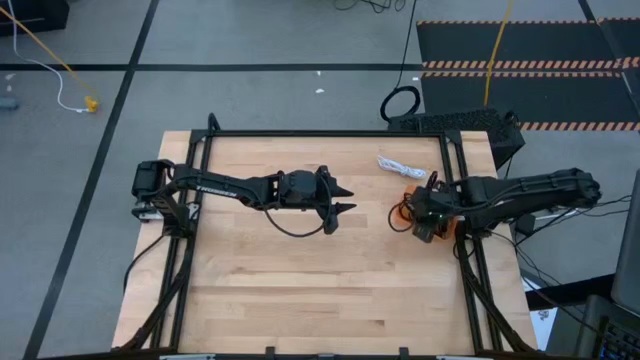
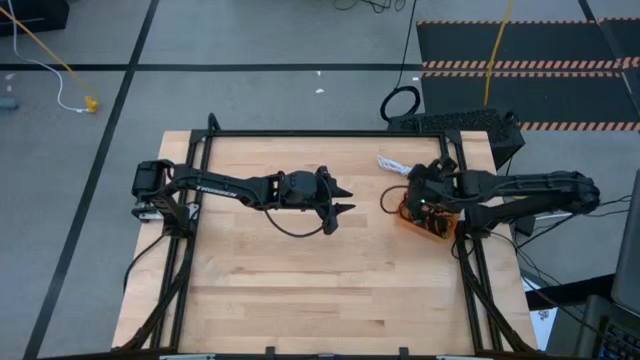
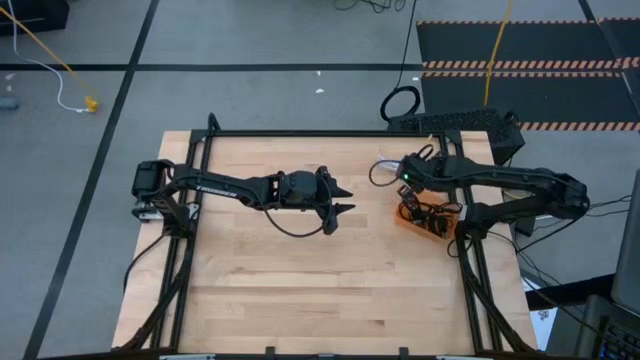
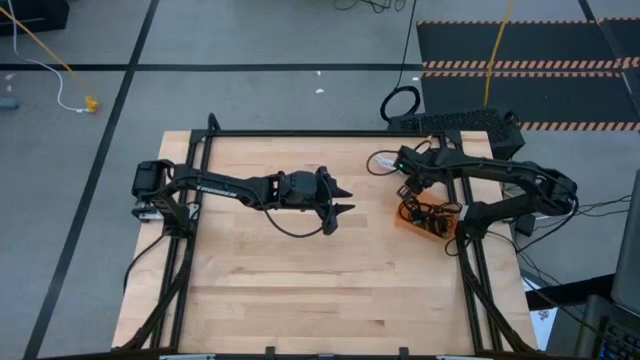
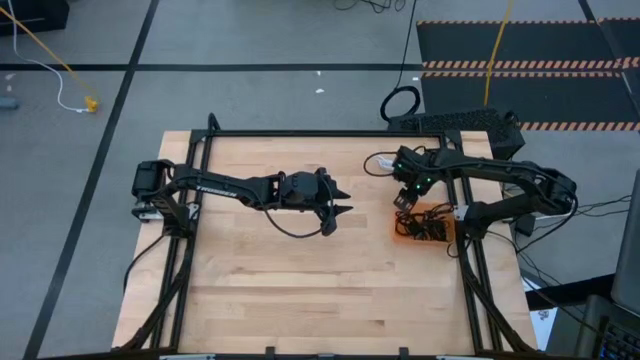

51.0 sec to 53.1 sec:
Task: Pick and place USB-C Cables
Adjust the orange bin

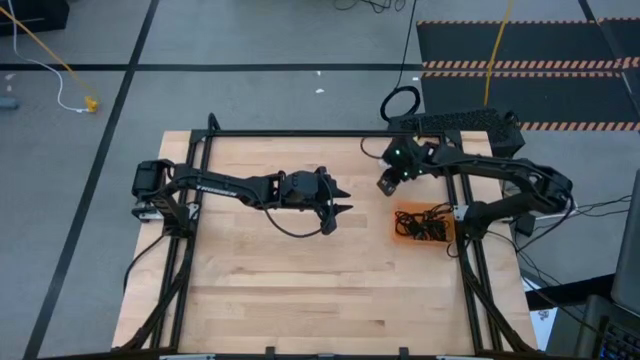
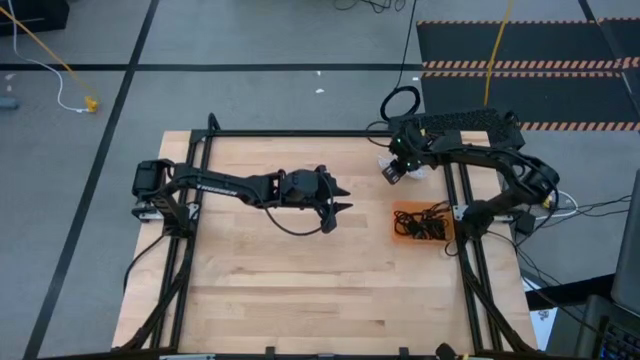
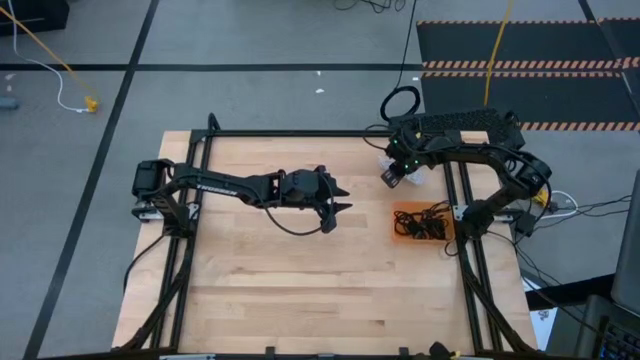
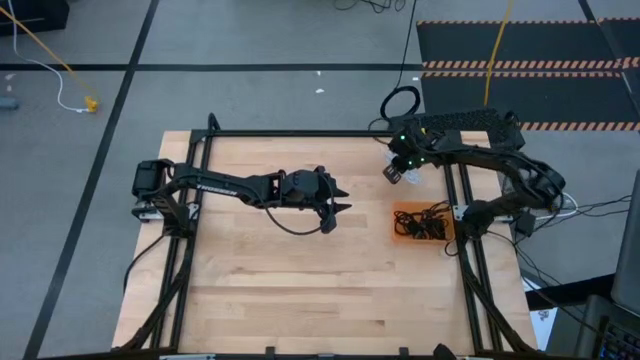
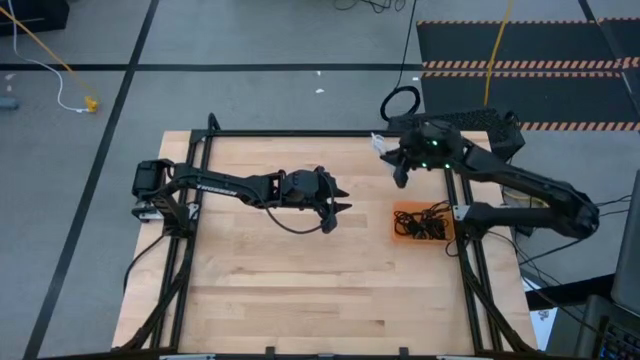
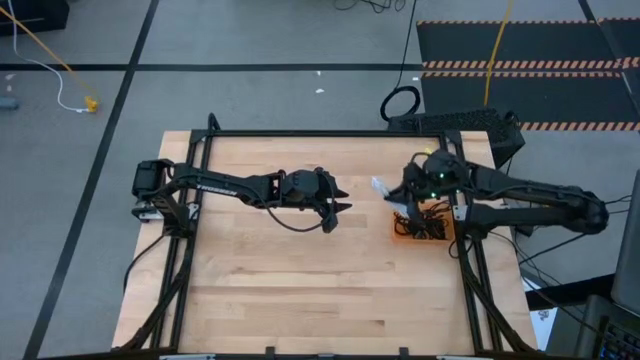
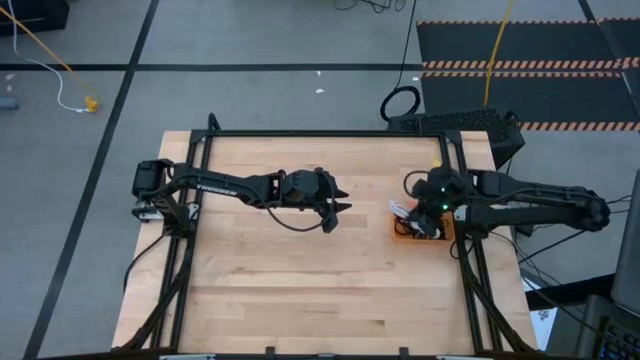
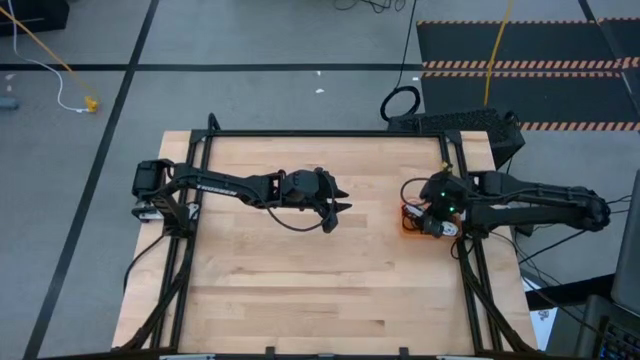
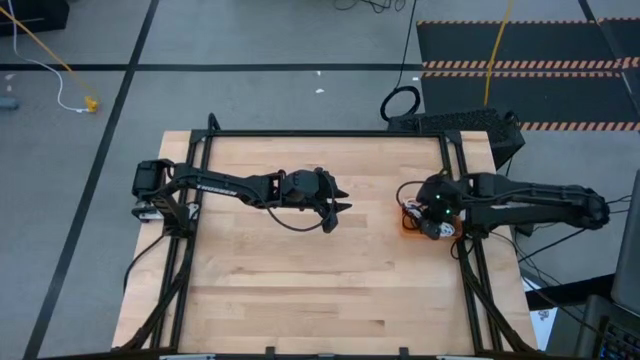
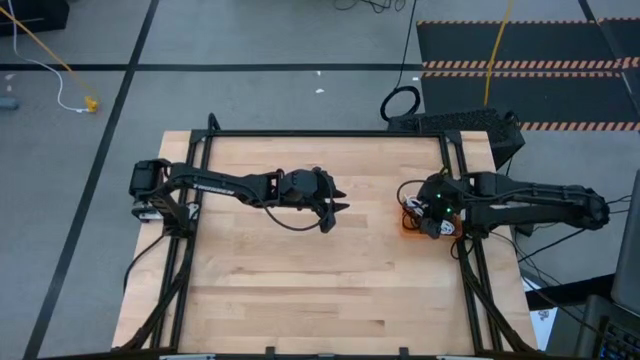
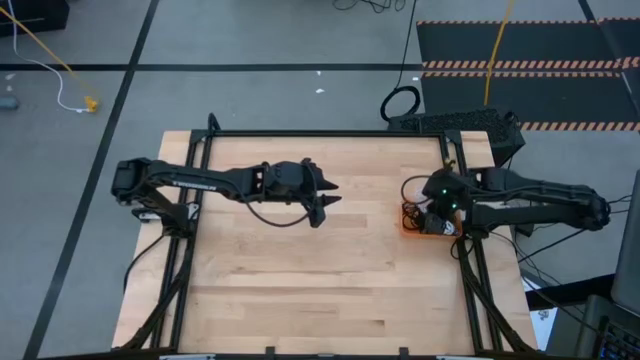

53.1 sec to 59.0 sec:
Put the white charger cable into the orange bin

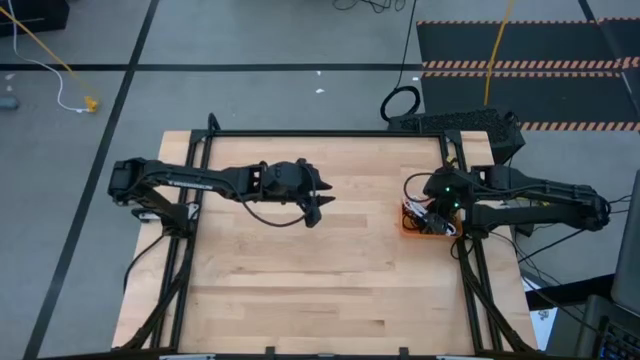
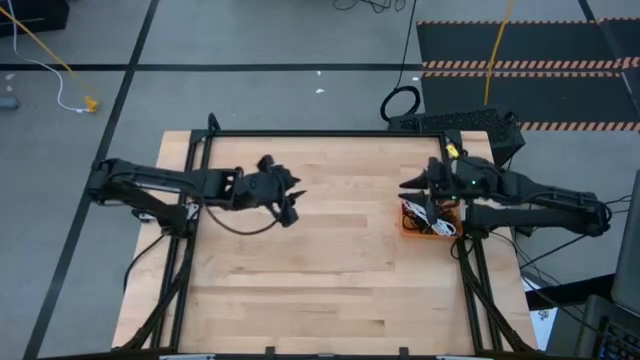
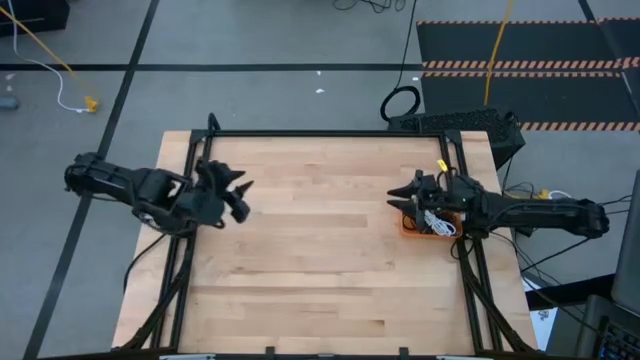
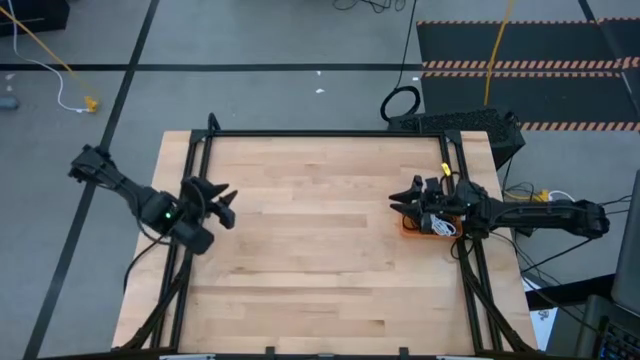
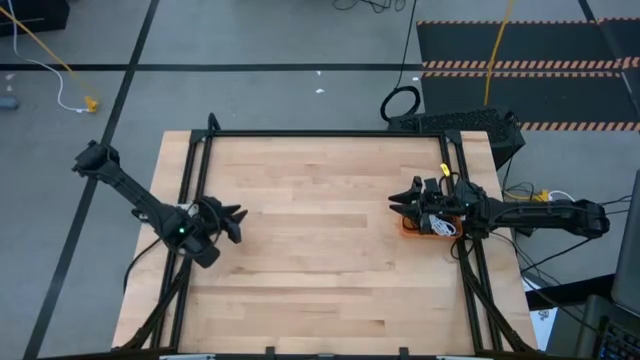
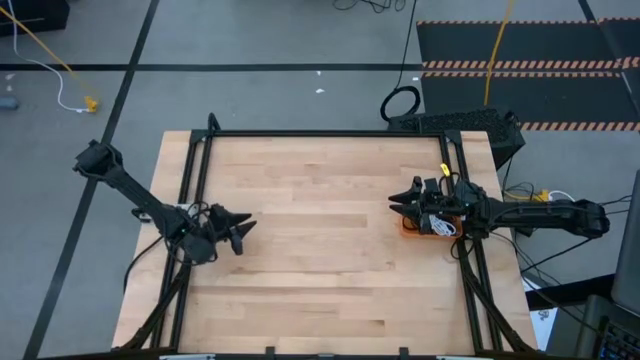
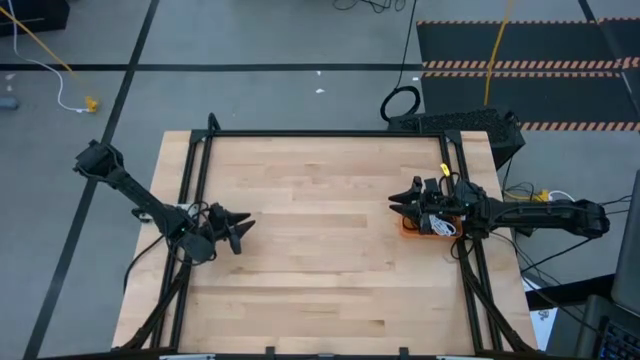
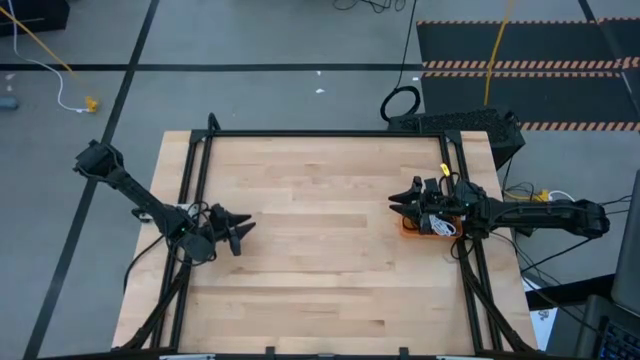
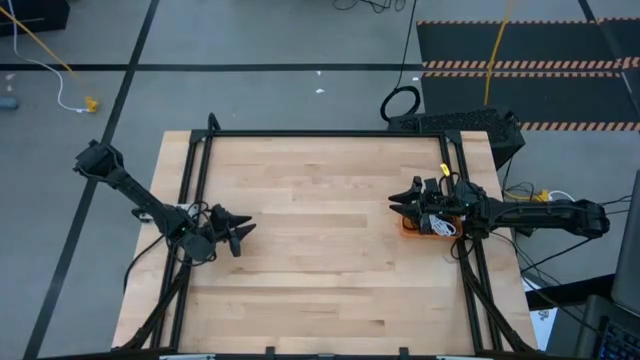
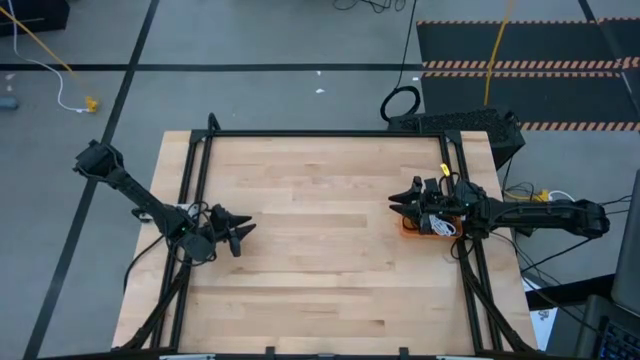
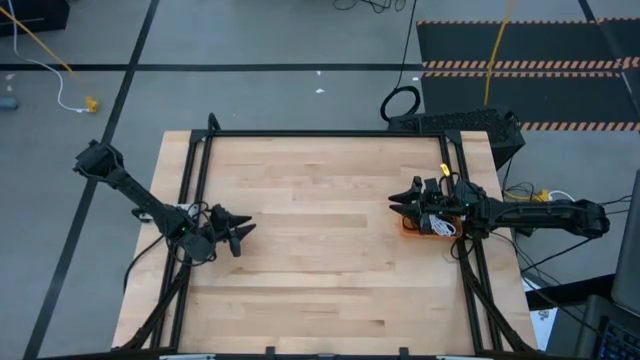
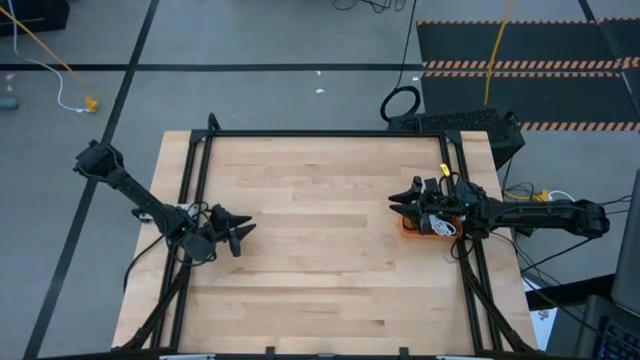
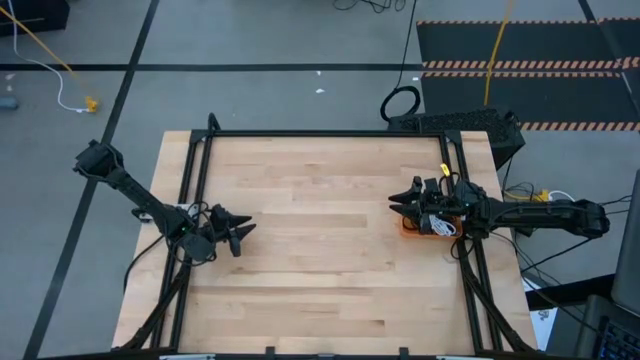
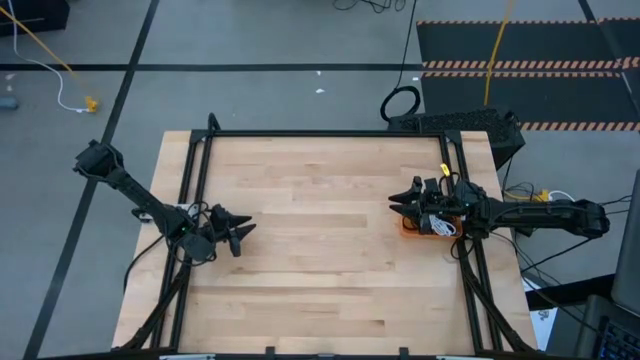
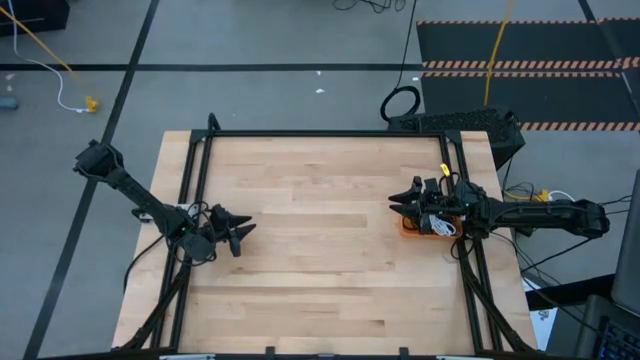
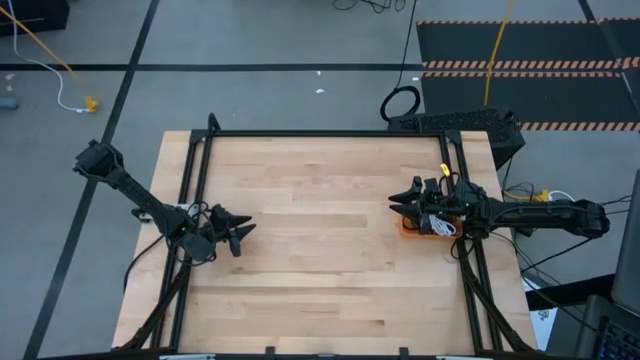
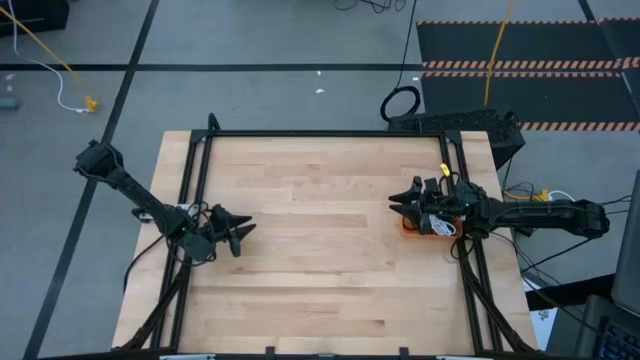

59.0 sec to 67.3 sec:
Return to Home Position
